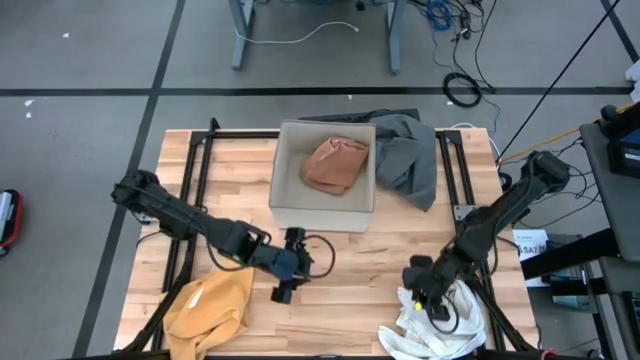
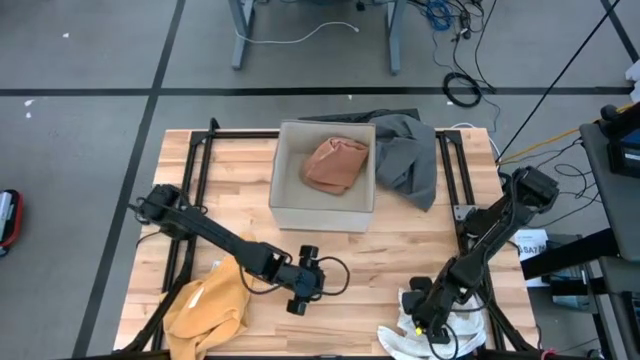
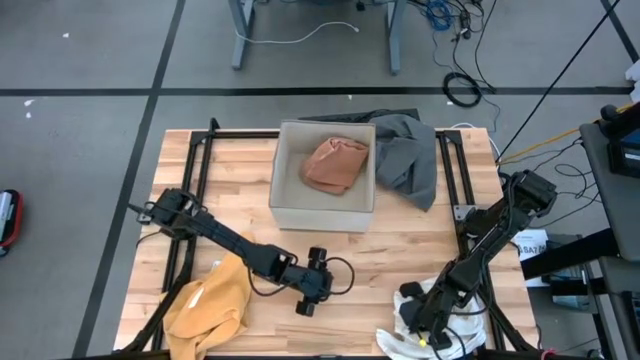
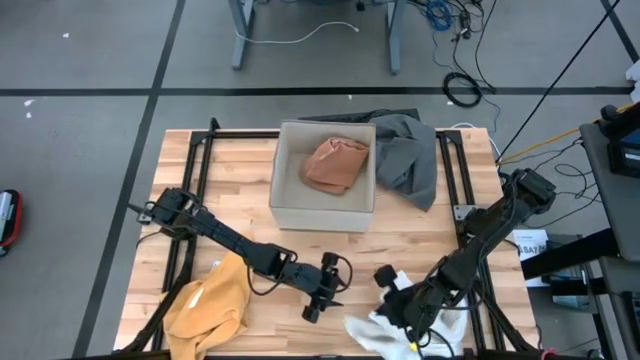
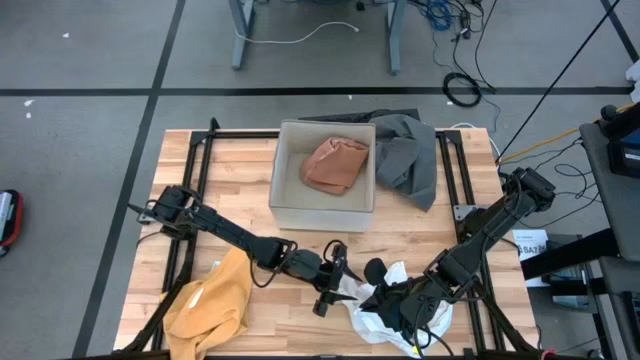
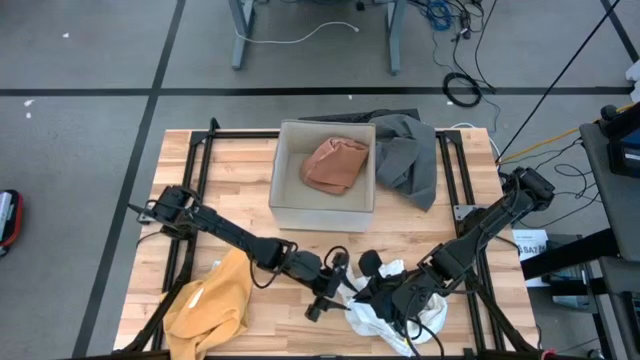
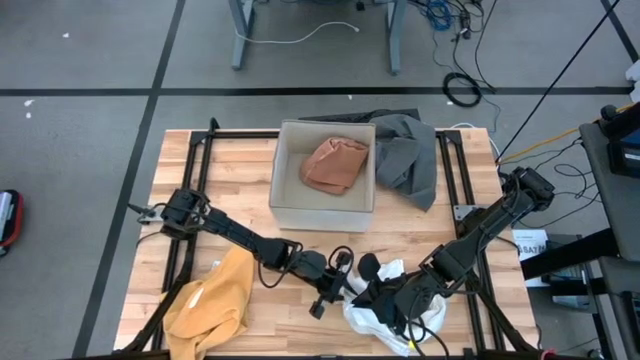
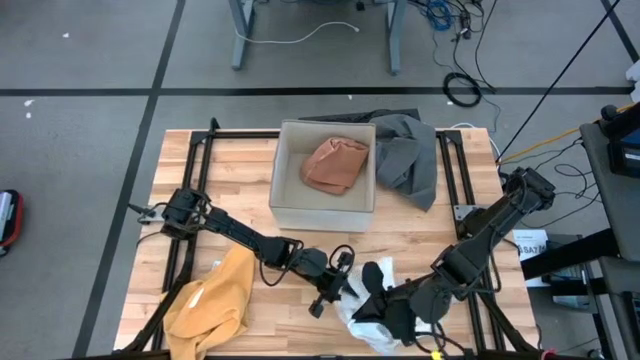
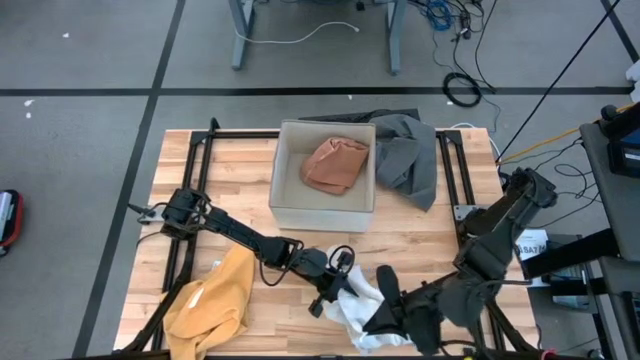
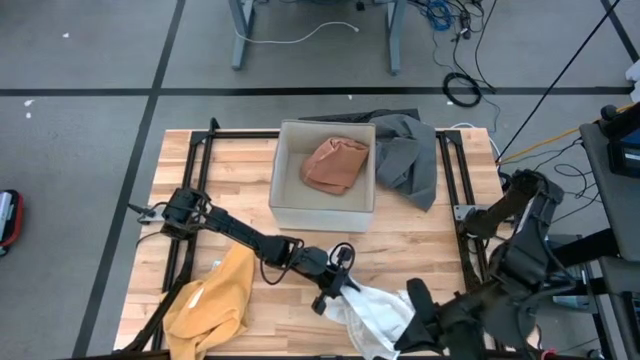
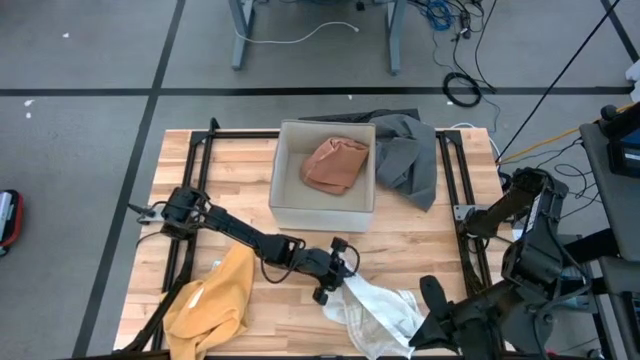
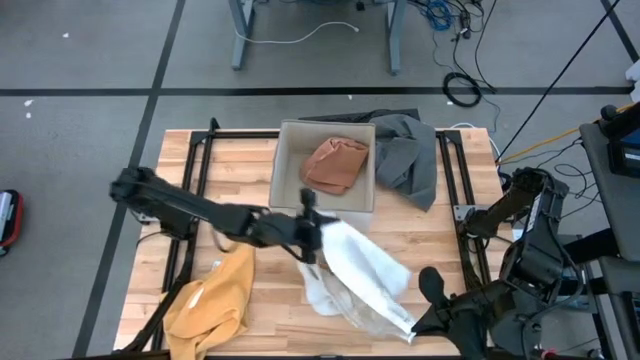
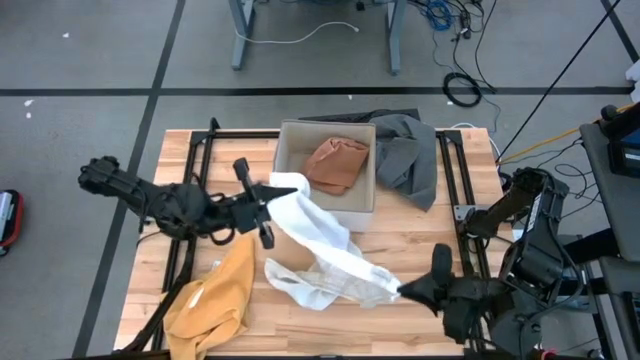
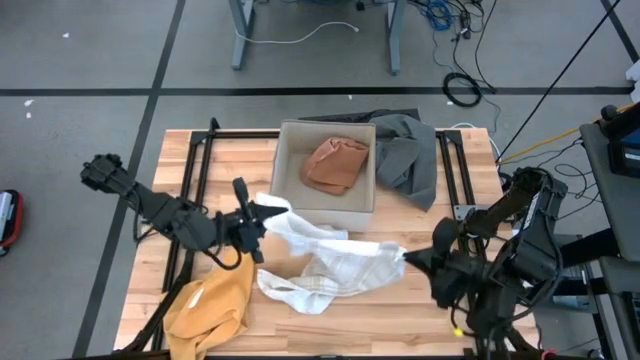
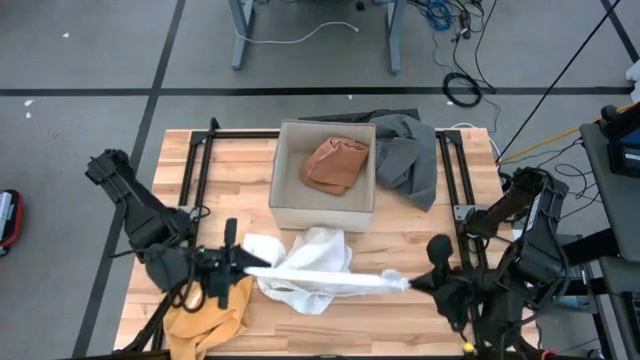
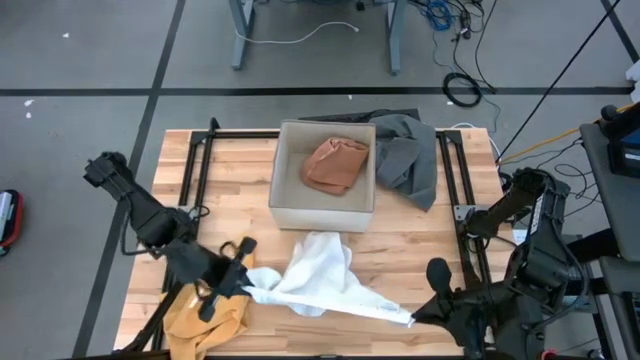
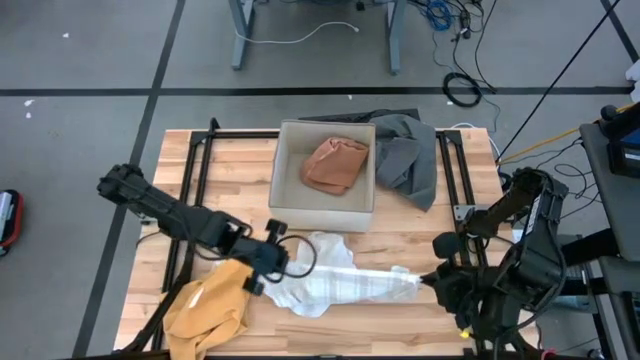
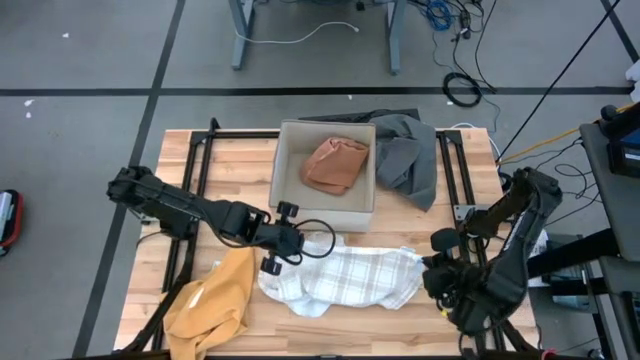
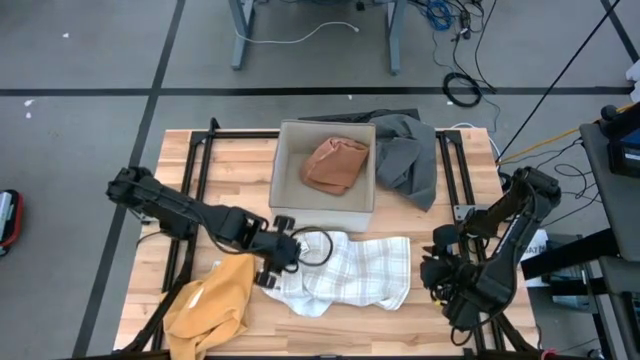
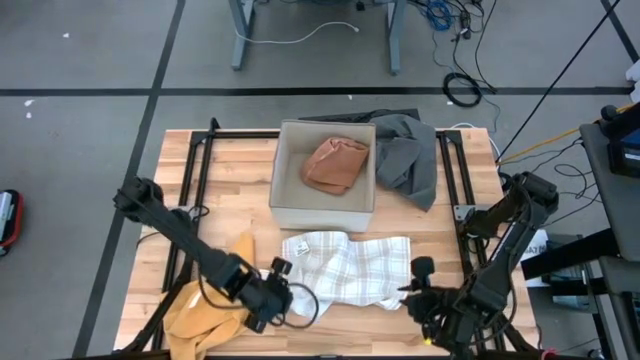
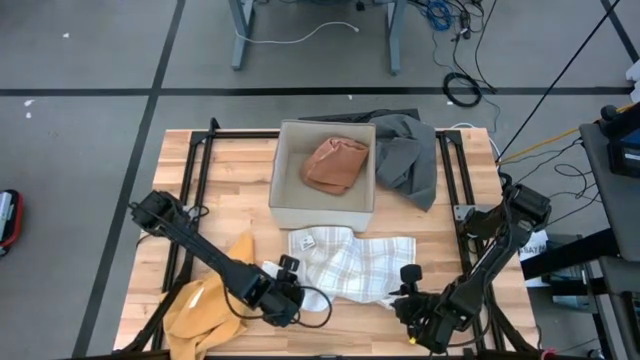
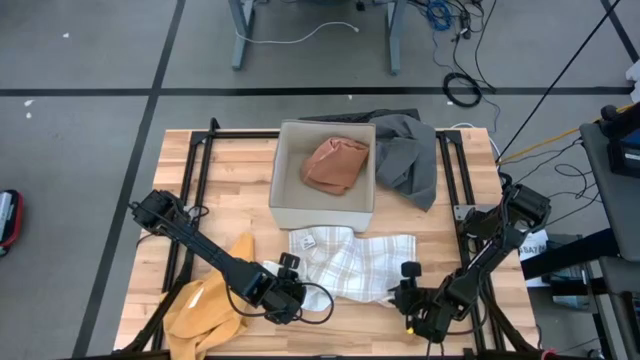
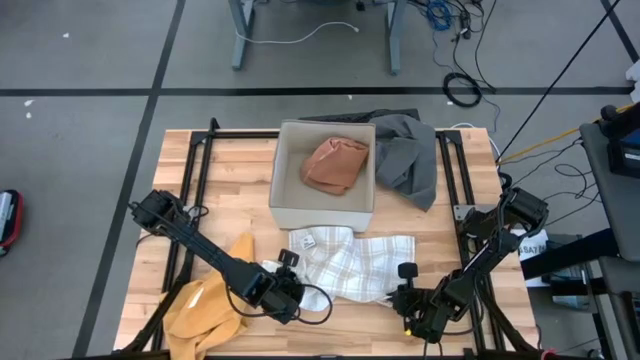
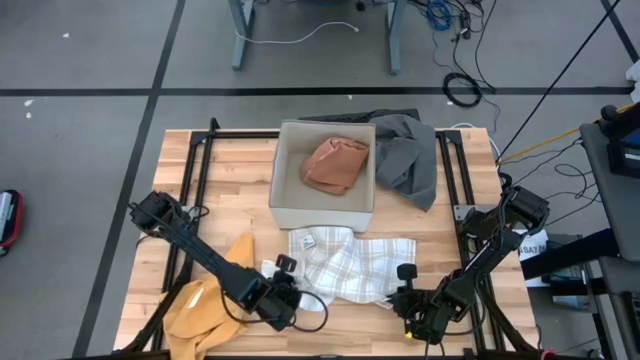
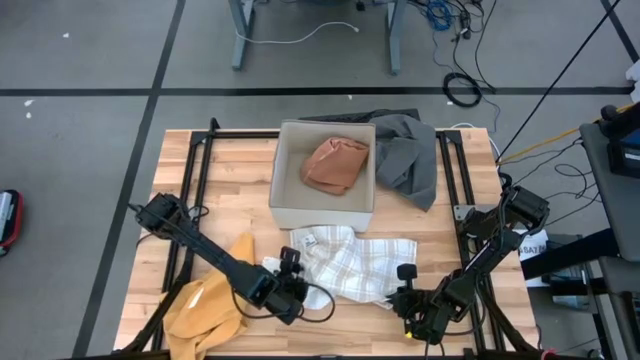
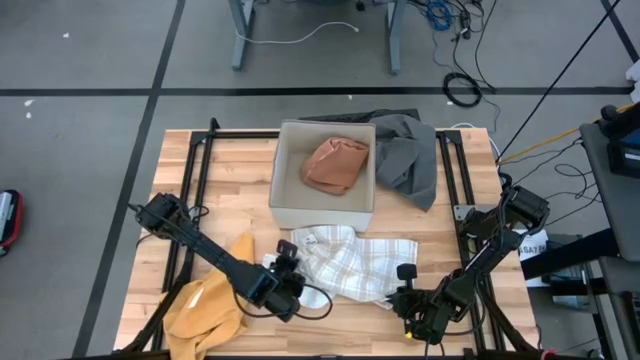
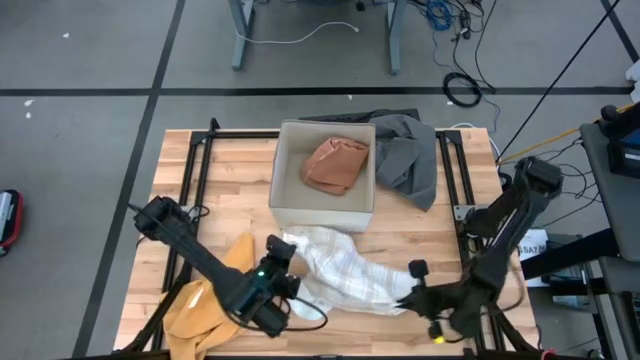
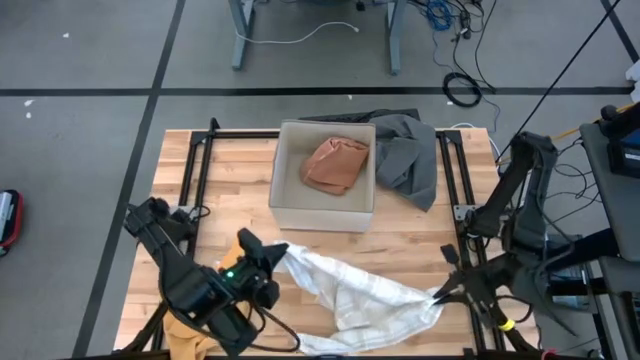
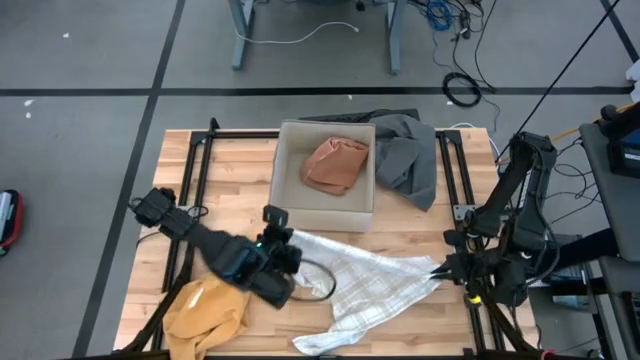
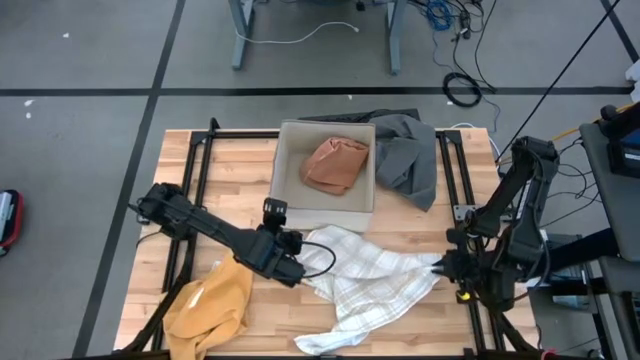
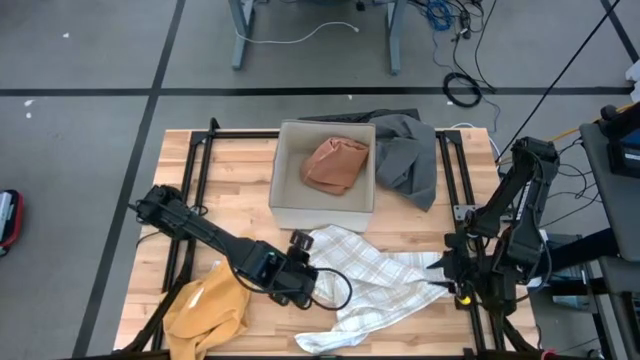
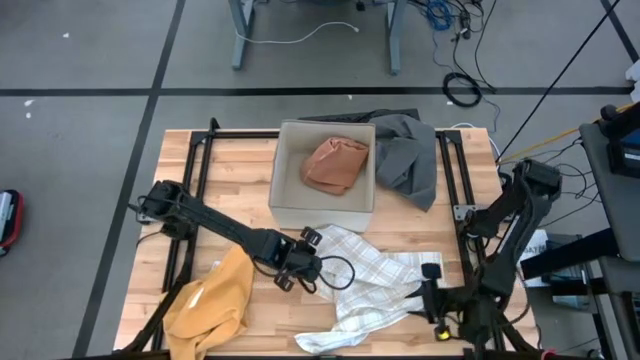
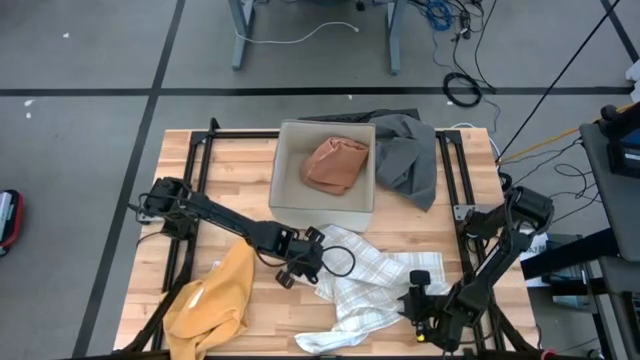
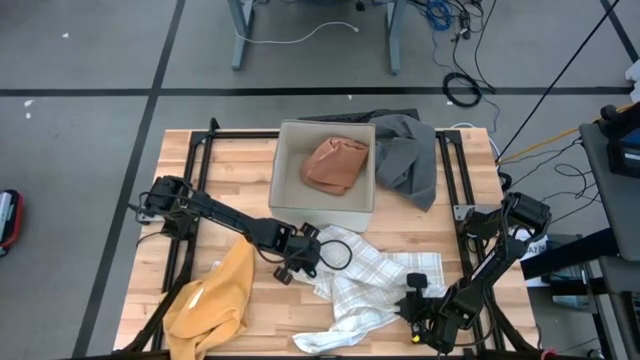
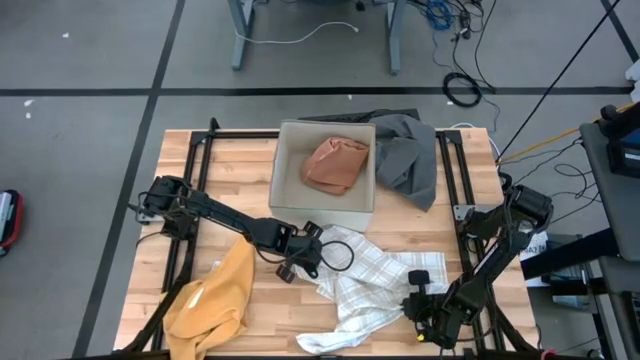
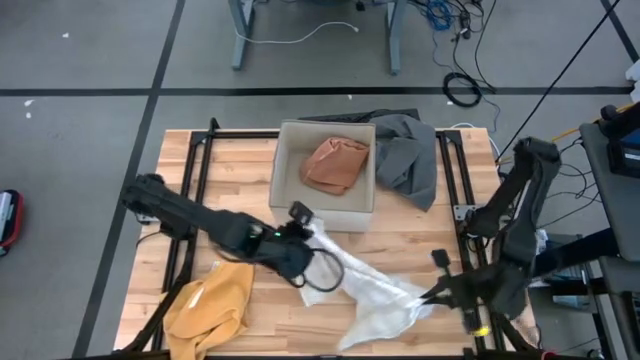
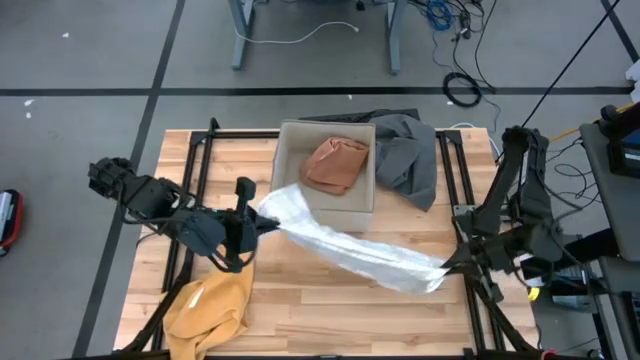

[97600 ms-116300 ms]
Task: Fold towel
Fold the white towel
